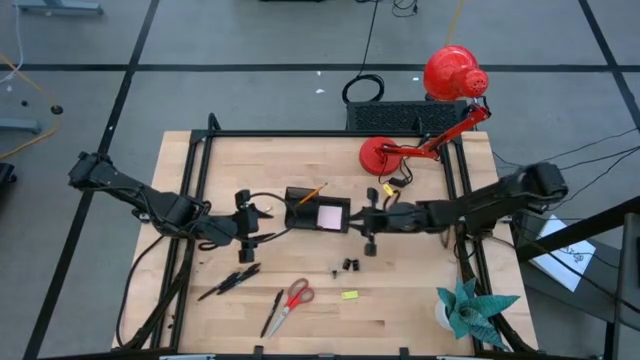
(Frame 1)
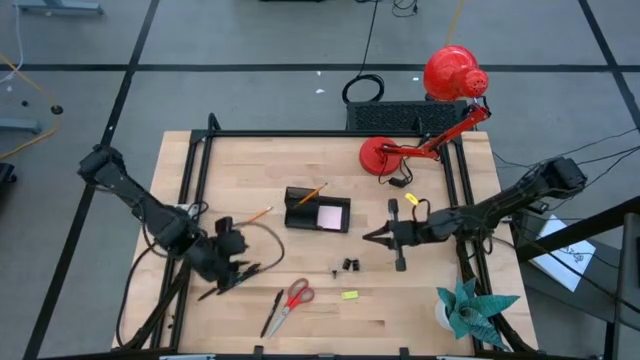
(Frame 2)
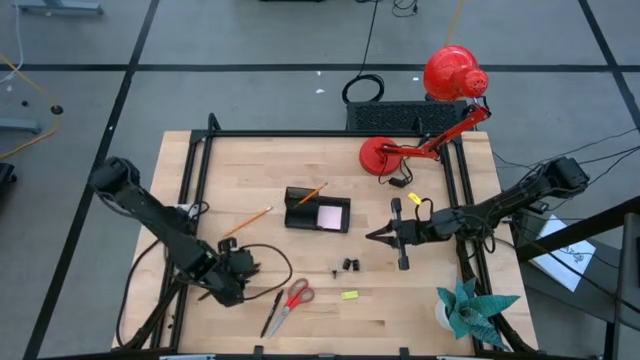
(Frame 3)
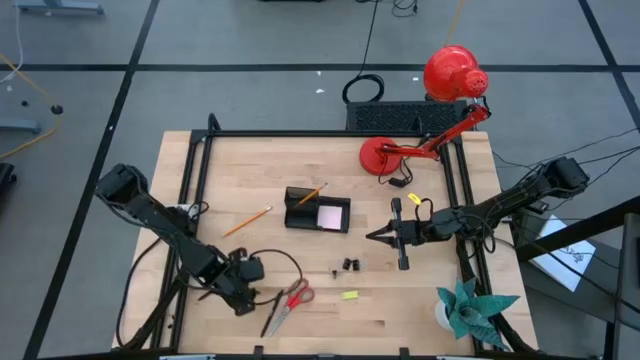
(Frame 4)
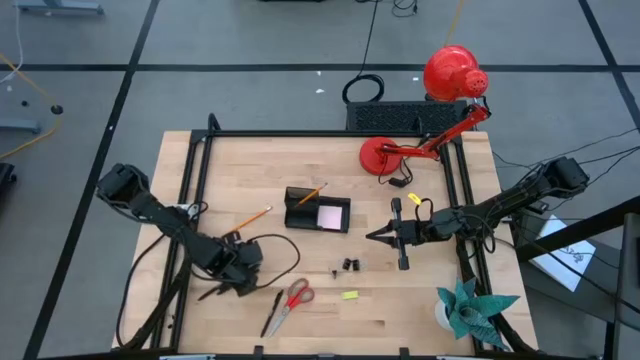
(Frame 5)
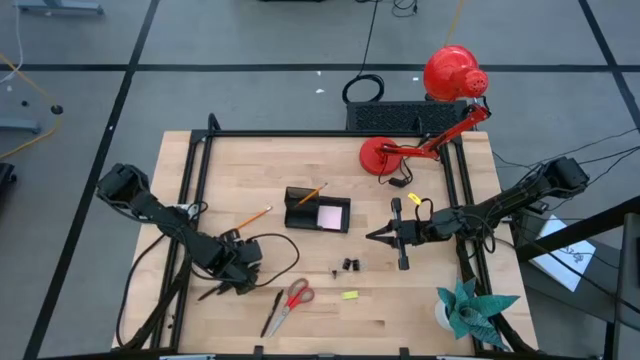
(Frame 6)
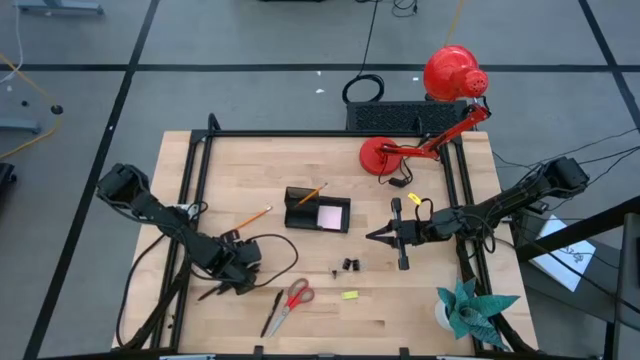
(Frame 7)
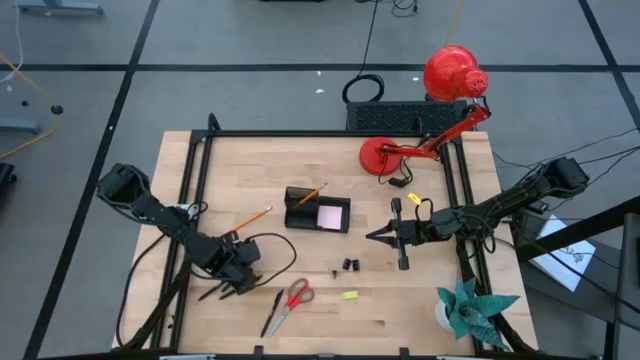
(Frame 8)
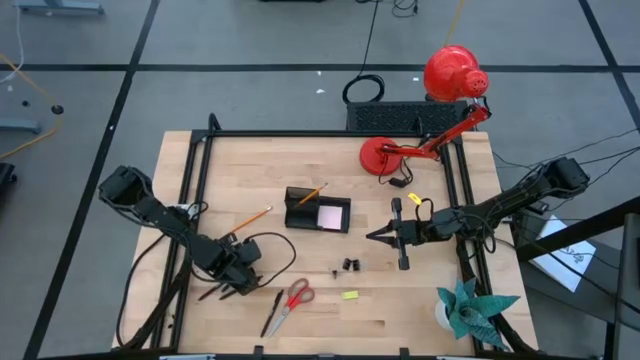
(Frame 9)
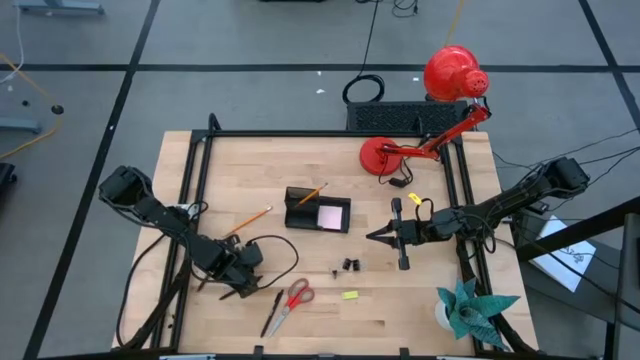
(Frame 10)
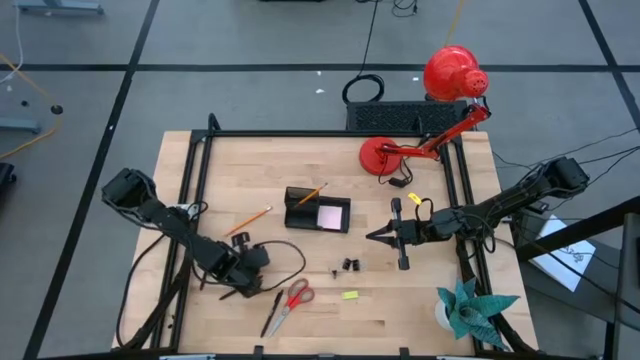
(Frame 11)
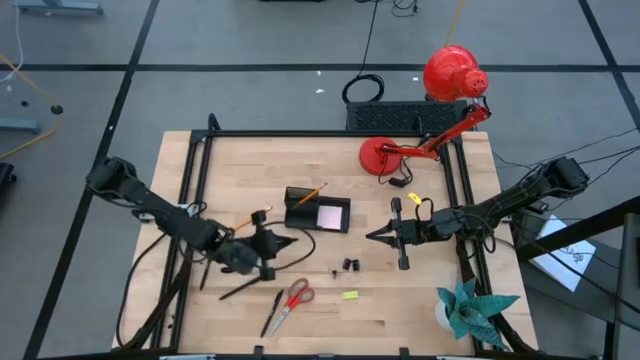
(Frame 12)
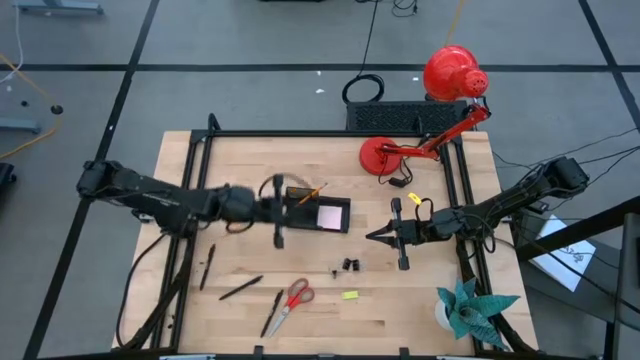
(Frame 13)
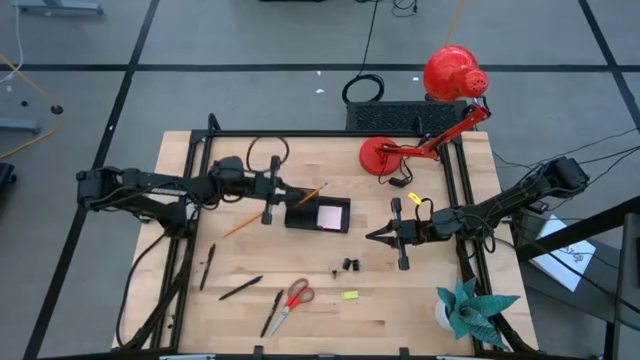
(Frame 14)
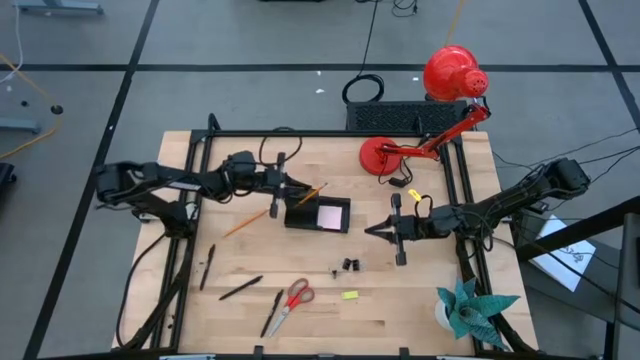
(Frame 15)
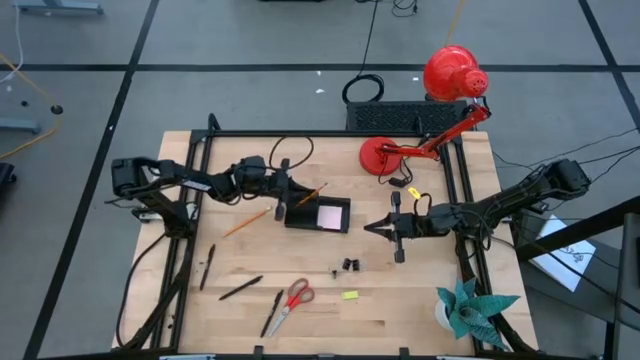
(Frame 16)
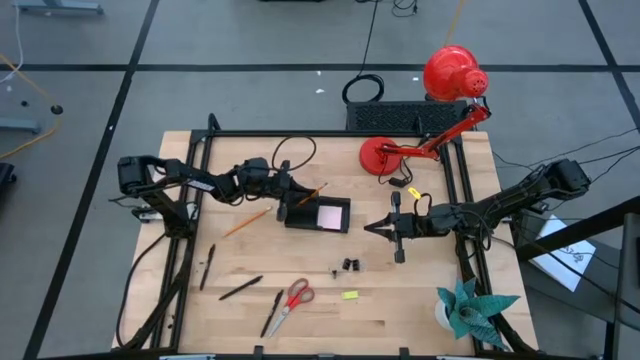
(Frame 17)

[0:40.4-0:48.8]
Task: Pick and place office supplies into organizer
Put the black pen into the black desk organizer

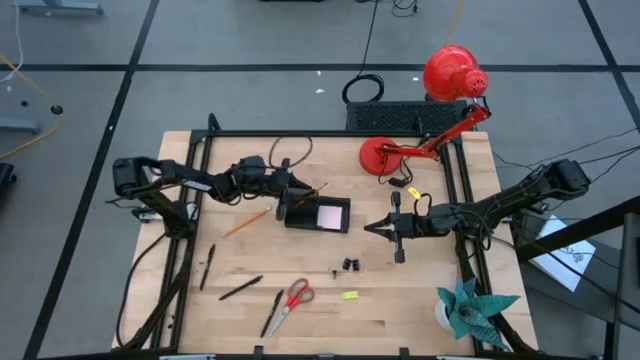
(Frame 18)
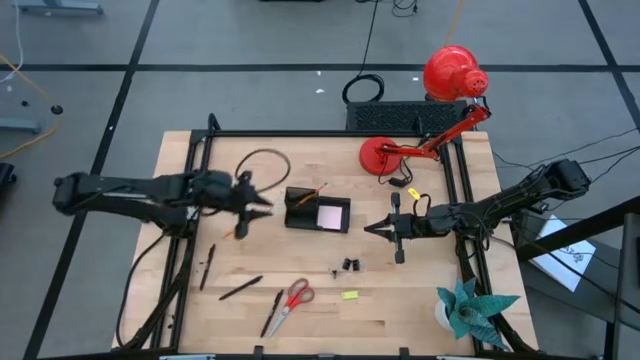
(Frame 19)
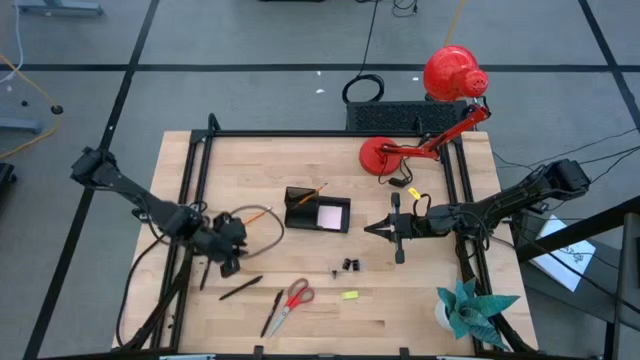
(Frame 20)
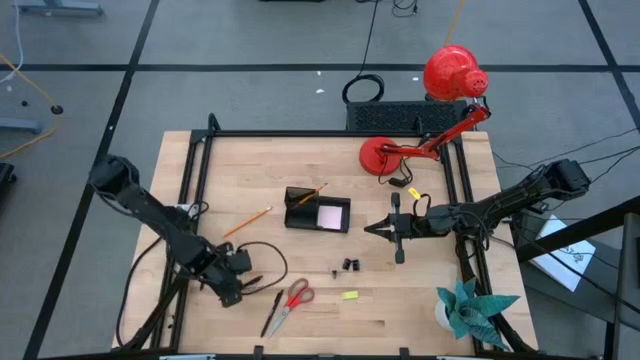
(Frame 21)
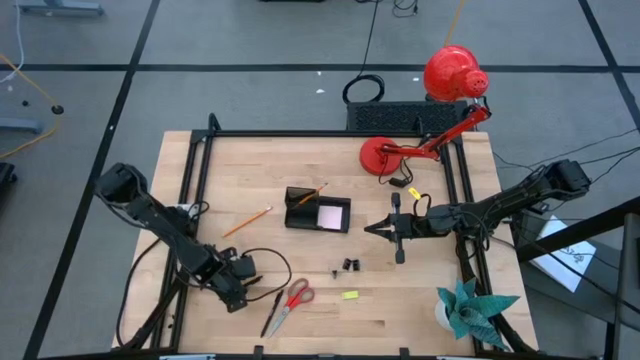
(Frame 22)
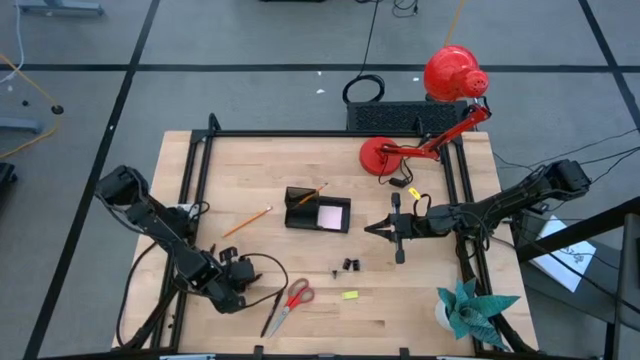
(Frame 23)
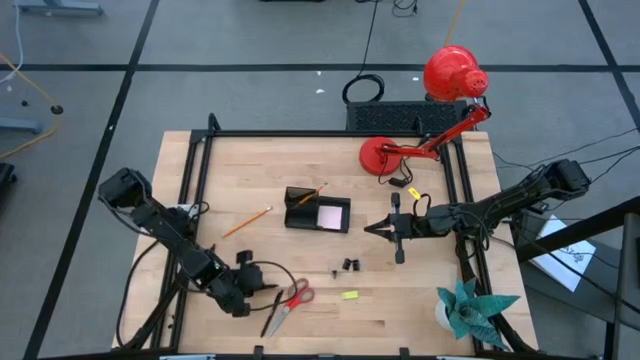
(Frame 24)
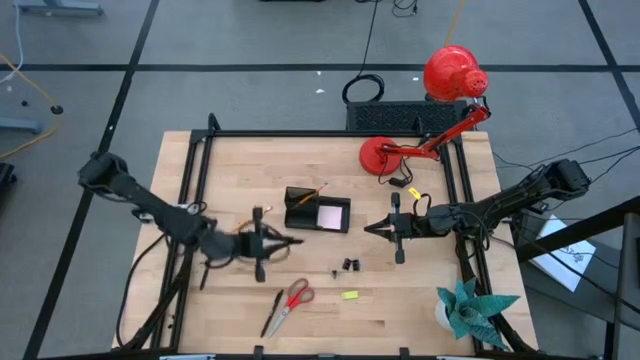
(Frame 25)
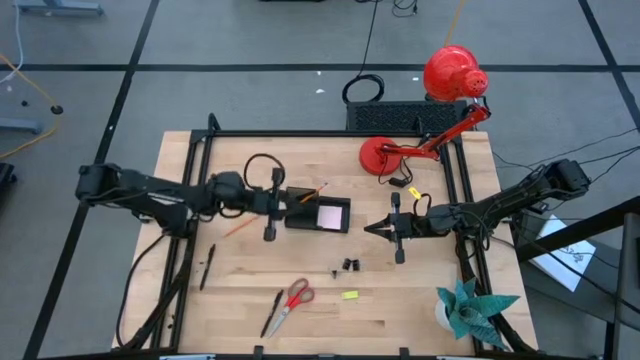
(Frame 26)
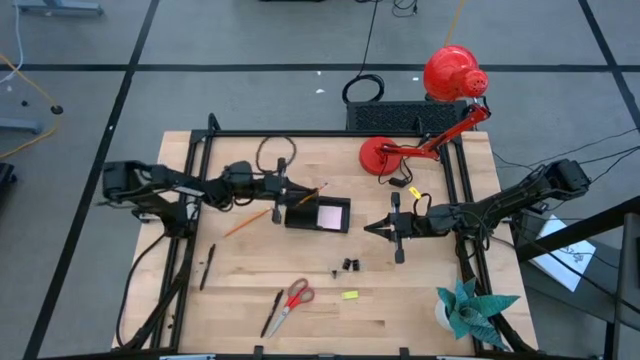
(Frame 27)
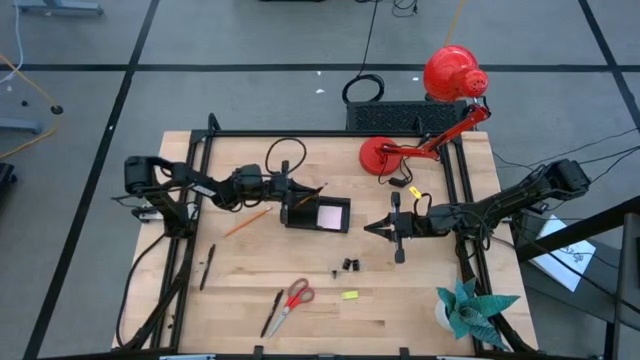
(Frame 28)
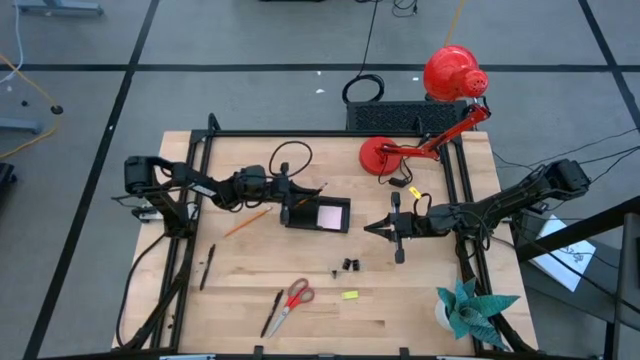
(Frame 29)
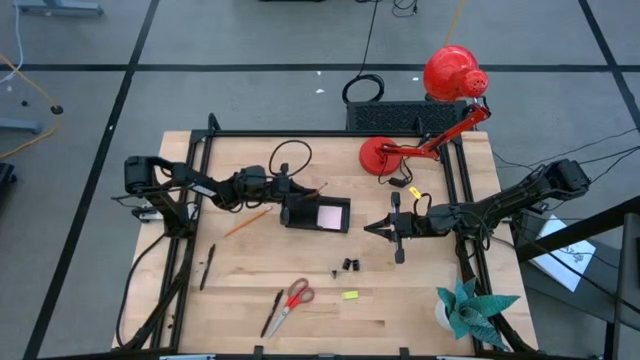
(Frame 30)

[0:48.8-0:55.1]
Put the black pen into the black desk organizer

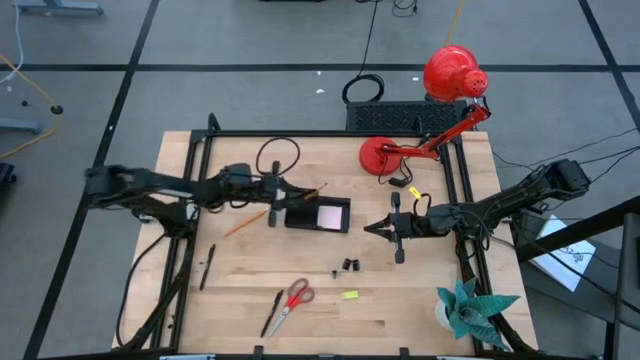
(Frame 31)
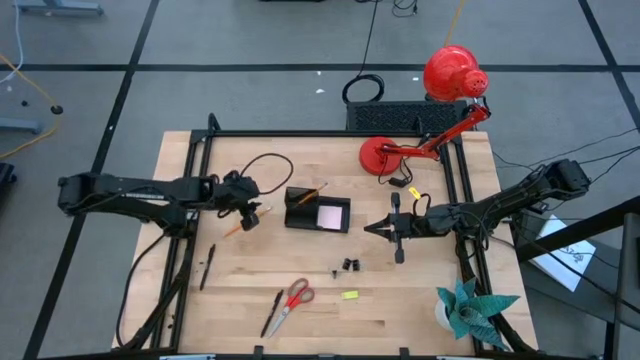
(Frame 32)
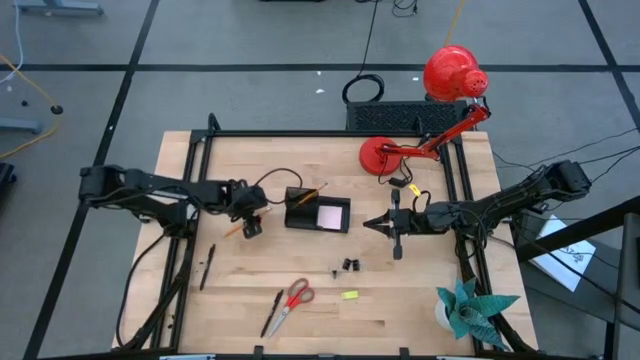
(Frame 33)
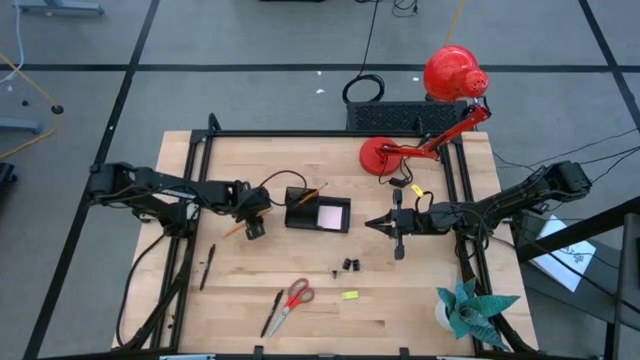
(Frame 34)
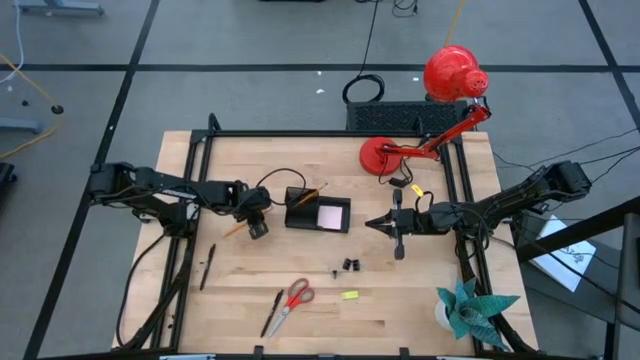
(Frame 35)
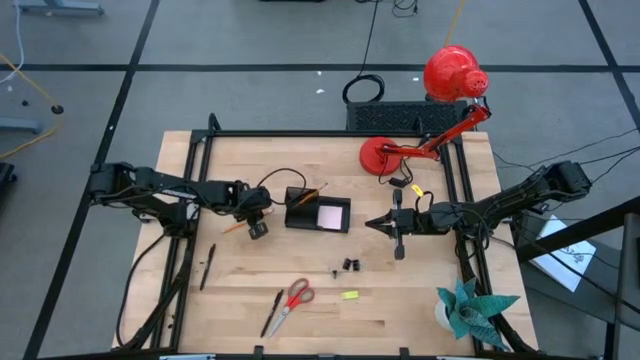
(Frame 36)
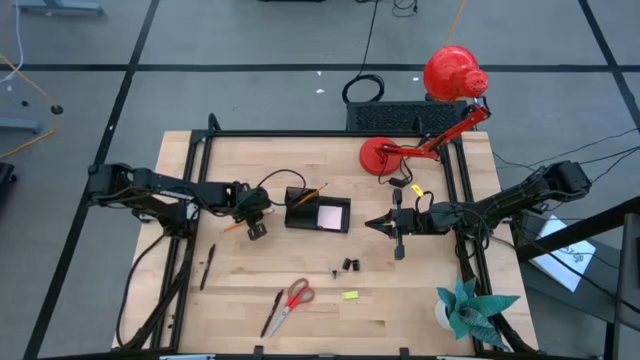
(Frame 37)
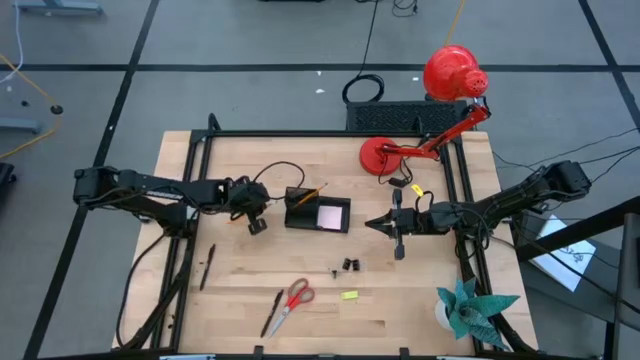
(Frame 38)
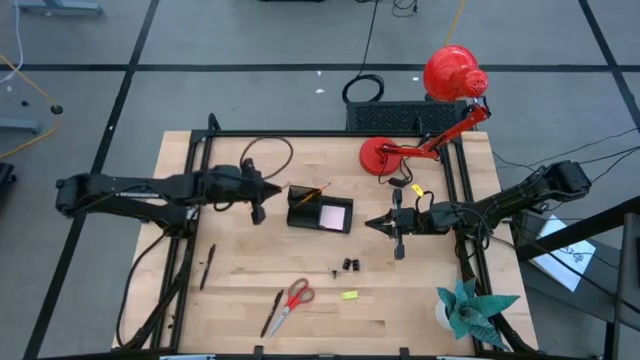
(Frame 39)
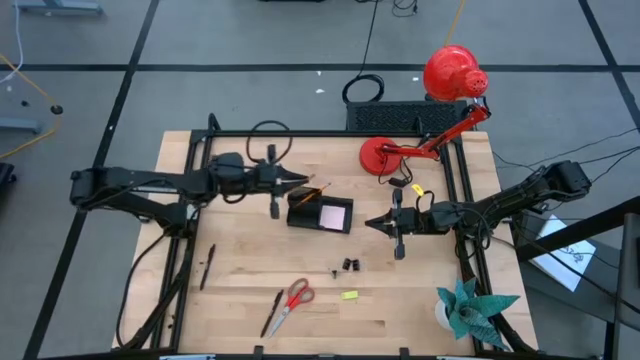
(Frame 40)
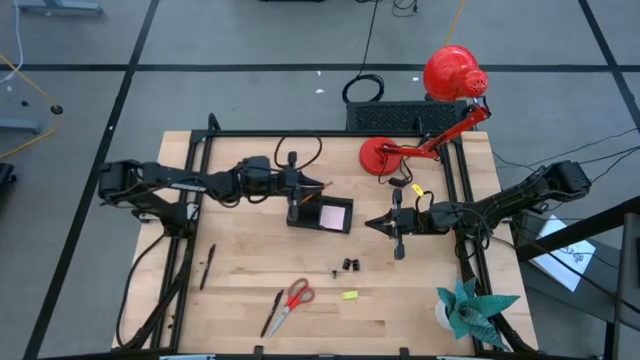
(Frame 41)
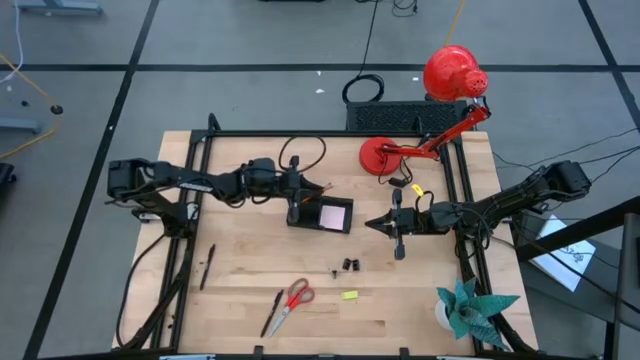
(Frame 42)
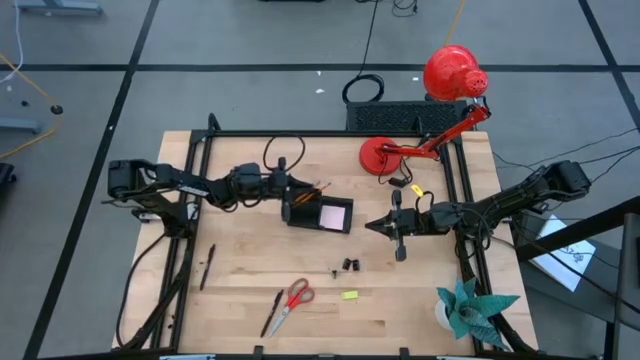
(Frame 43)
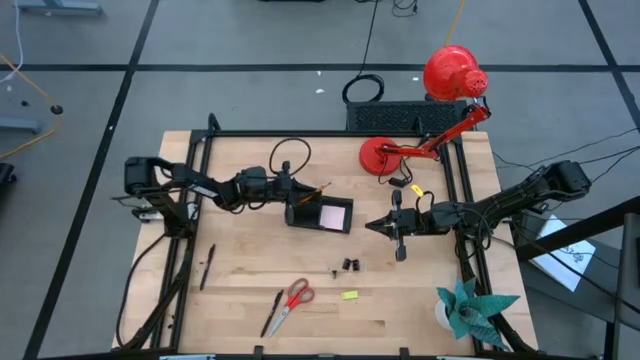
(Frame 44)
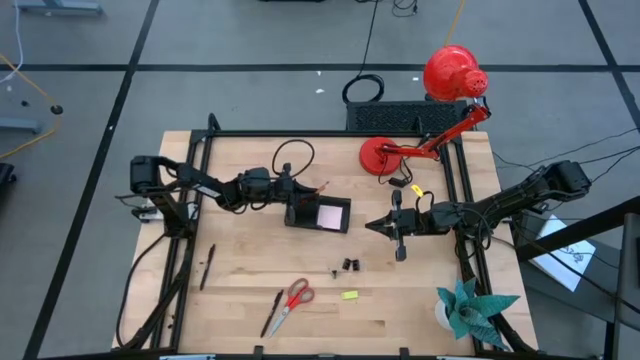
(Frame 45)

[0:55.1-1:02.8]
Put the orange pencil into the black desk organizer
